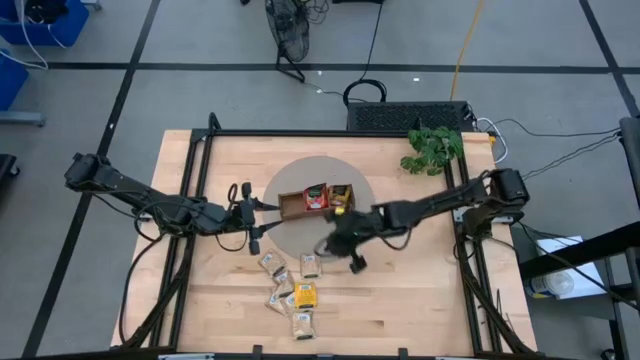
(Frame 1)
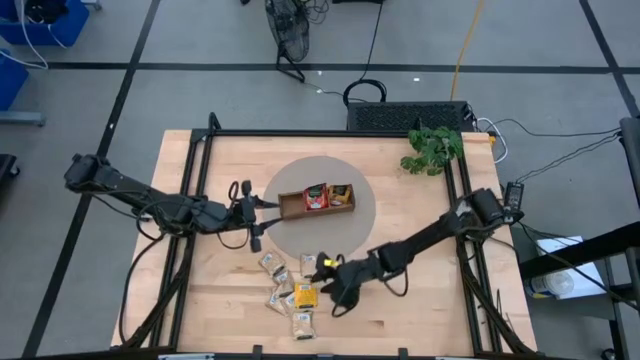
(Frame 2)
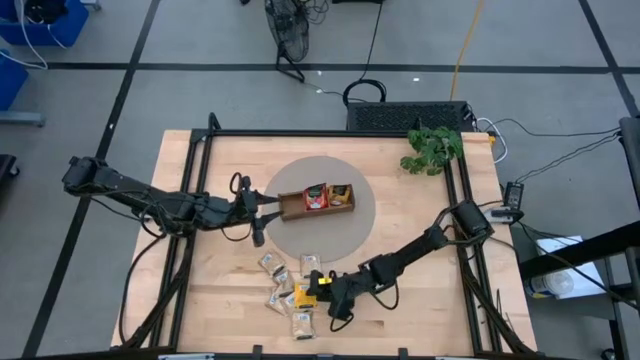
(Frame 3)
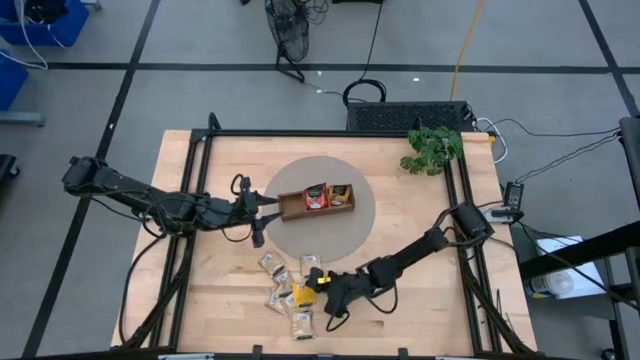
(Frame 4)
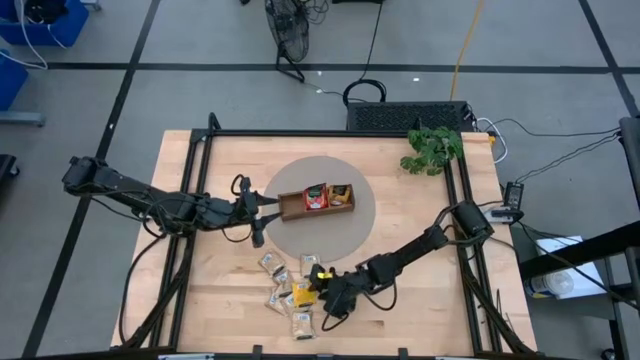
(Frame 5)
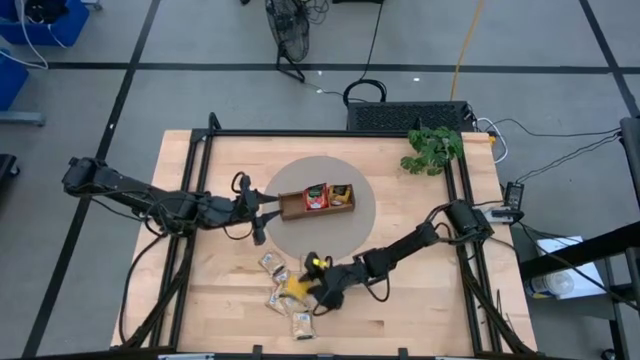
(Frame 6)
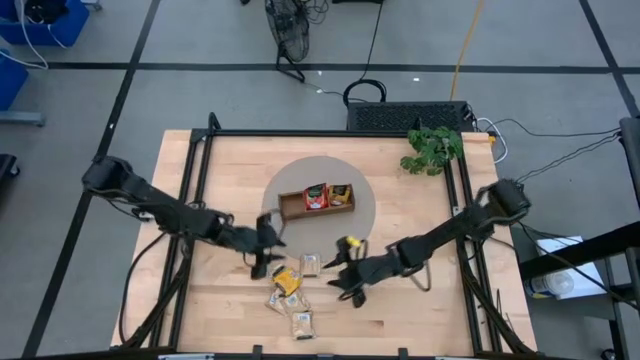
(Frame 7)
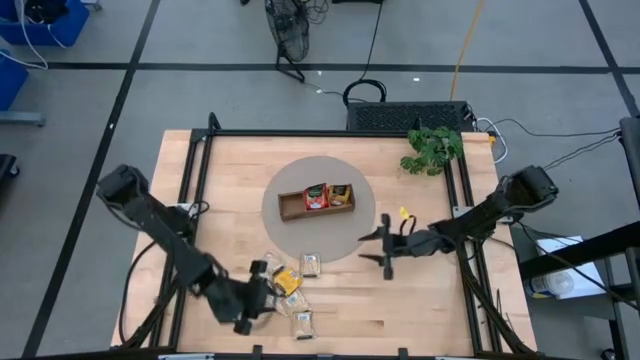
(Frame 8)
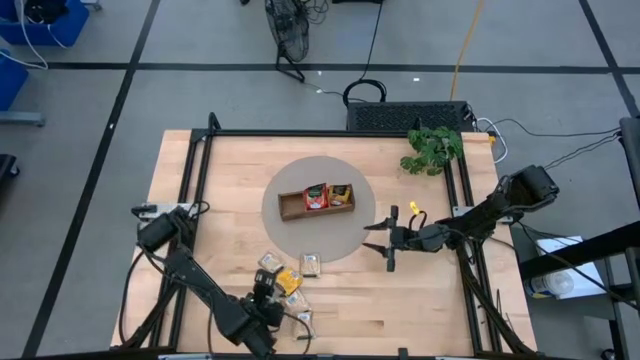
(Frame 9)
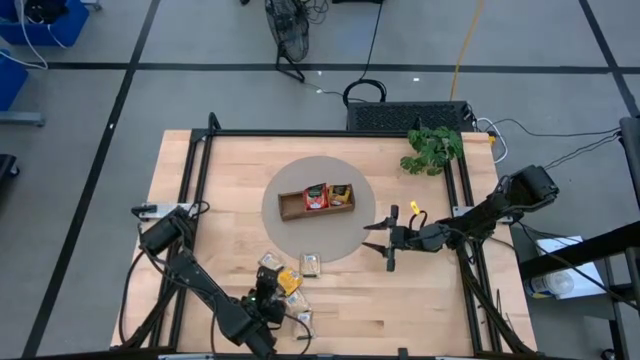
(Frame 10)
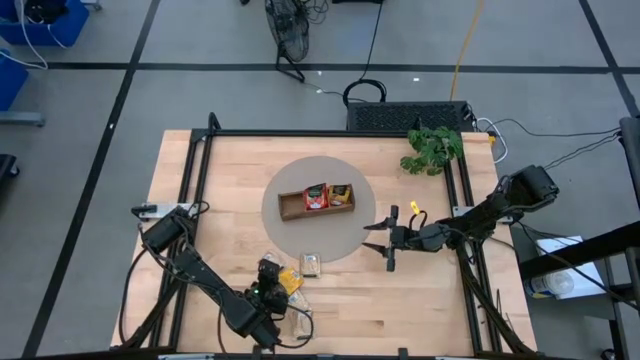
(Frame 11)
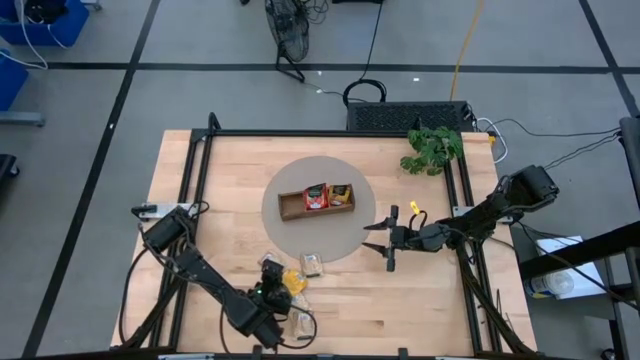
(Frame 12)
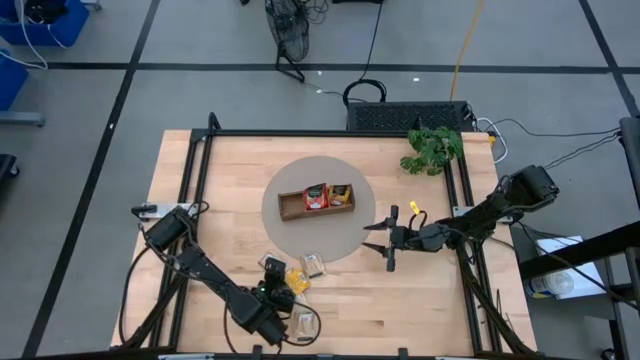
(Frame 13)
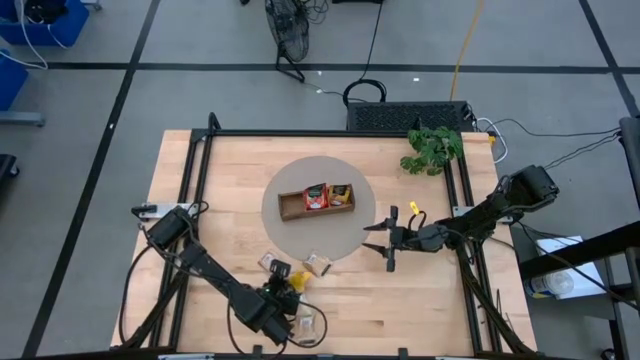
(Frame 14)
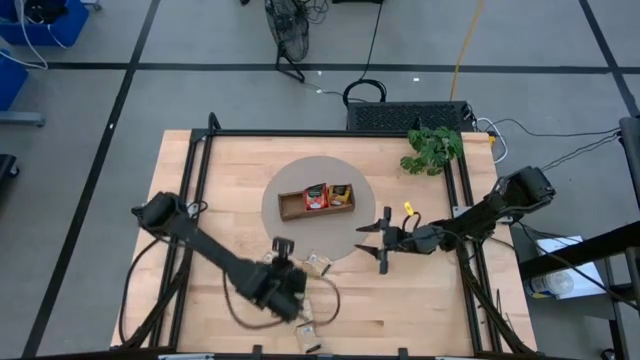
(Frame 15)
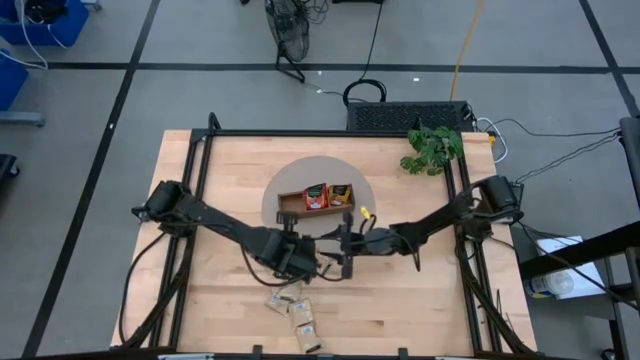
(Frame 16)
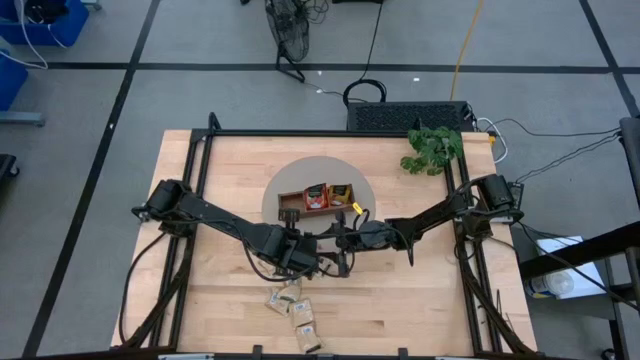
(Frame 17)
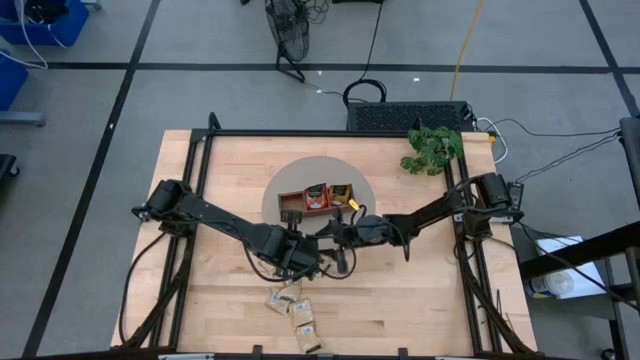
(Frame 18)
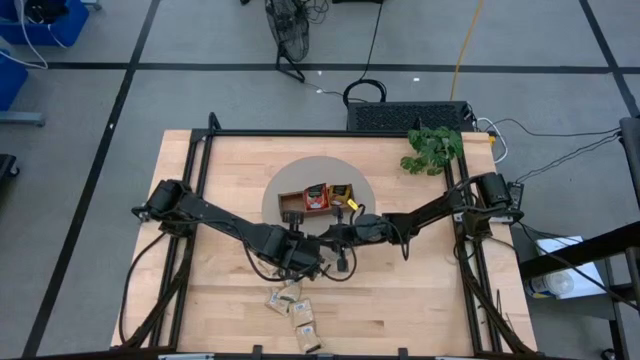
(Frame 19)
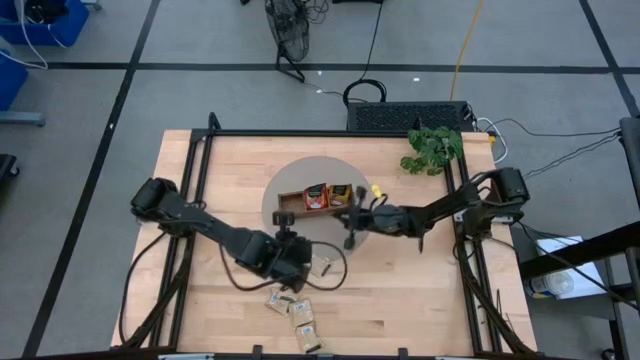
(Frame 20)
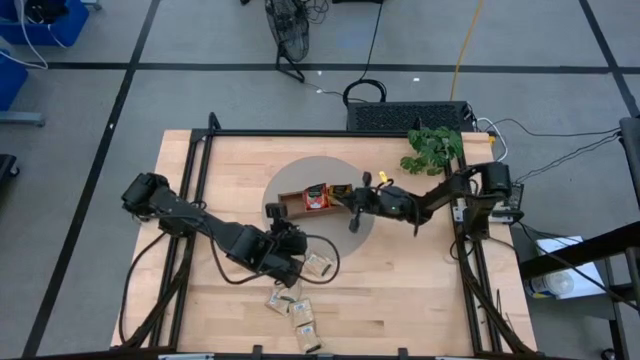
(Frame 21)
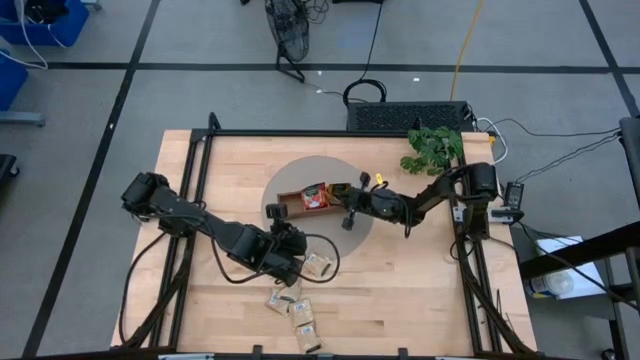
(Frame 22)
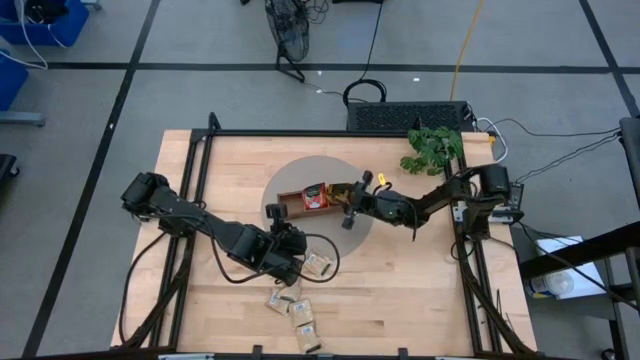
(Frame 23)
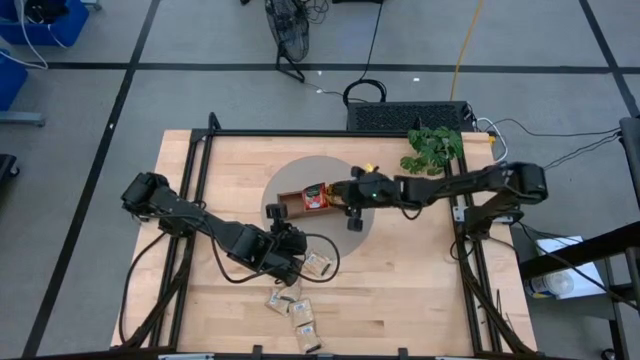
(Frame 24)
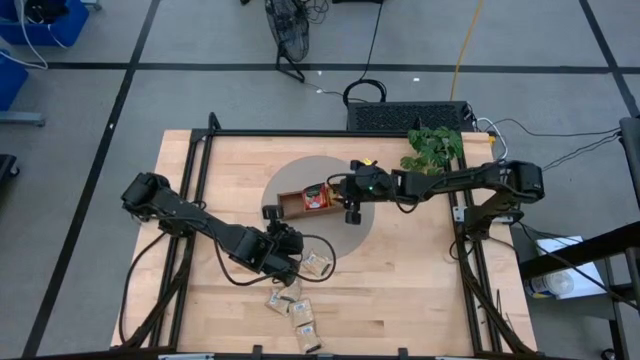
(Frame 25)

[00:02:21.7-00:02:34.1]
Task: Pick & Place Tea
Put the yellow tea bag into the wooden organizer

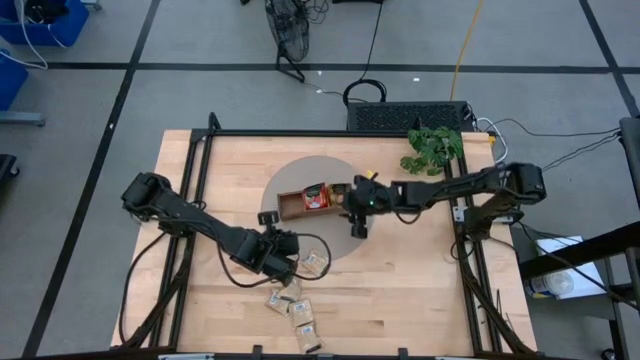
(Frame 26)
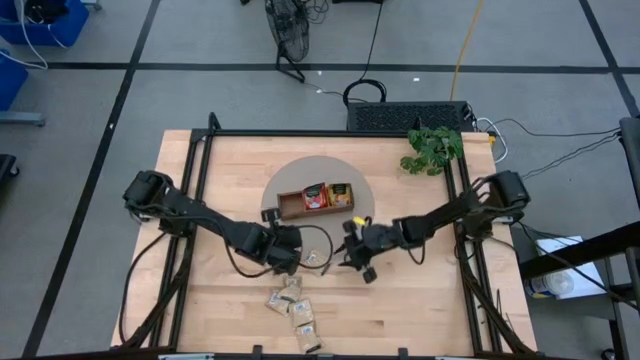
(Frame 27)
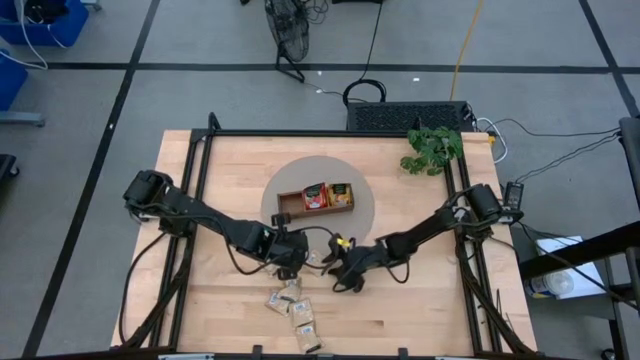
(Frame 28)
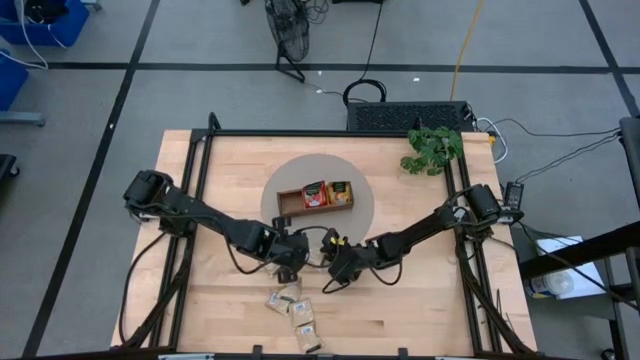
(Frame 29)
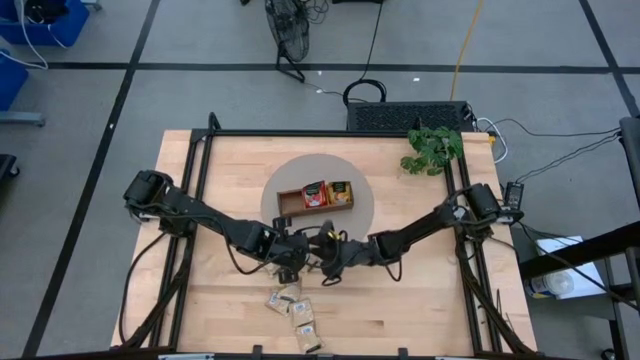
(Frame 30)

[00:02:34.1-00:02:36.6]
Put the brown tea bag into the wooden organizer

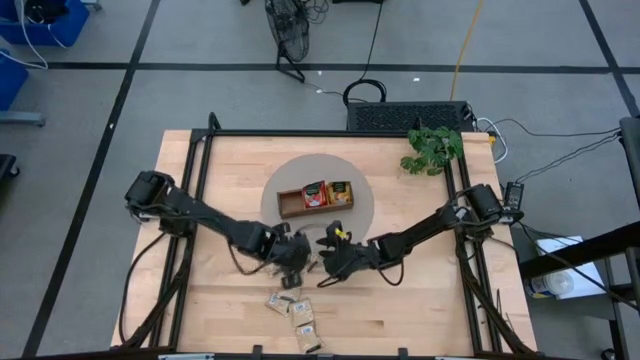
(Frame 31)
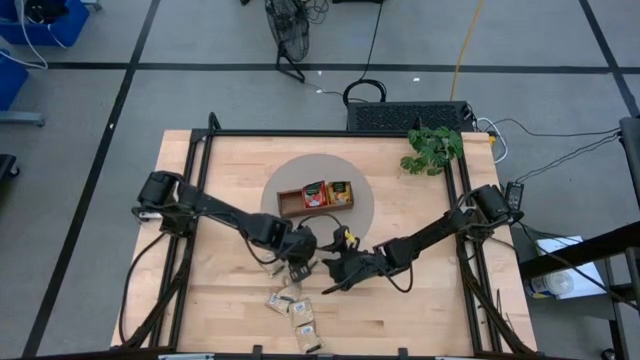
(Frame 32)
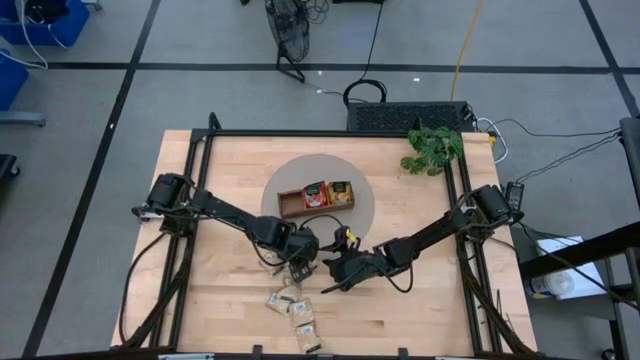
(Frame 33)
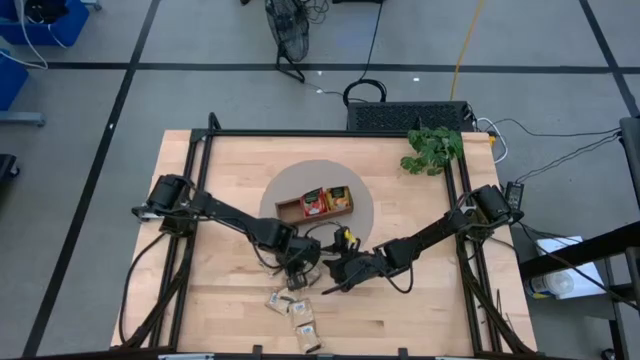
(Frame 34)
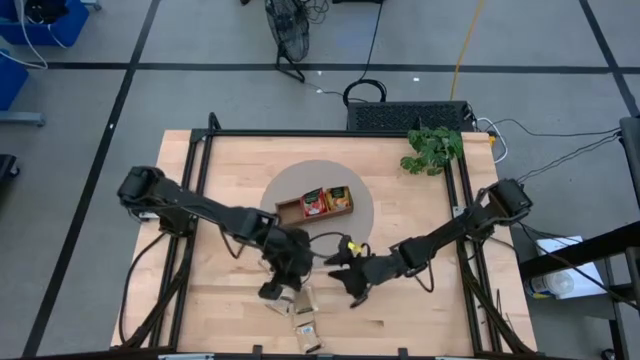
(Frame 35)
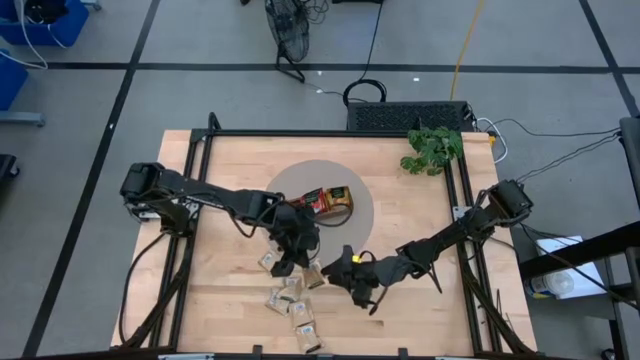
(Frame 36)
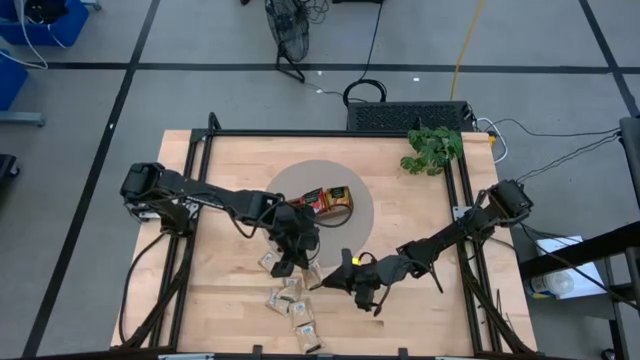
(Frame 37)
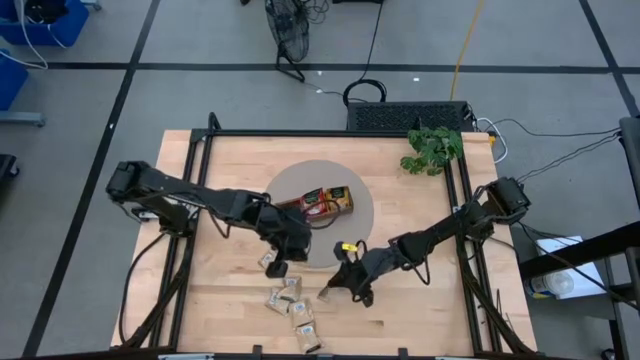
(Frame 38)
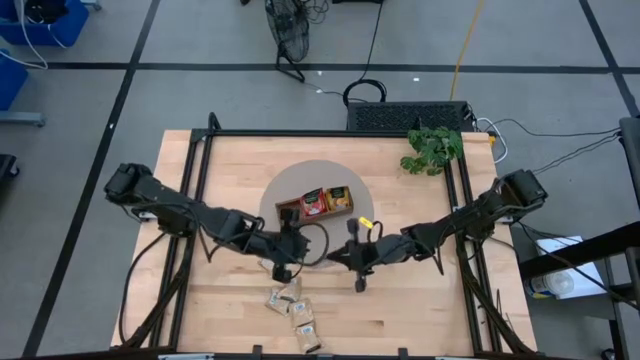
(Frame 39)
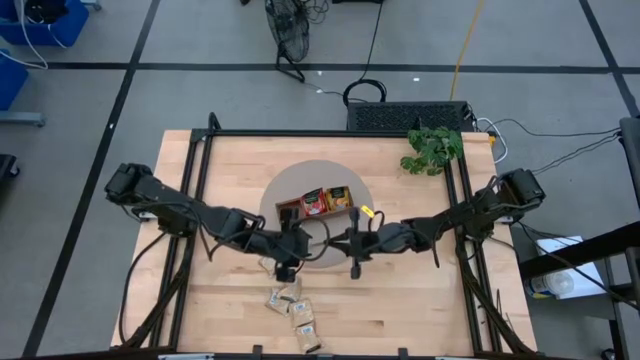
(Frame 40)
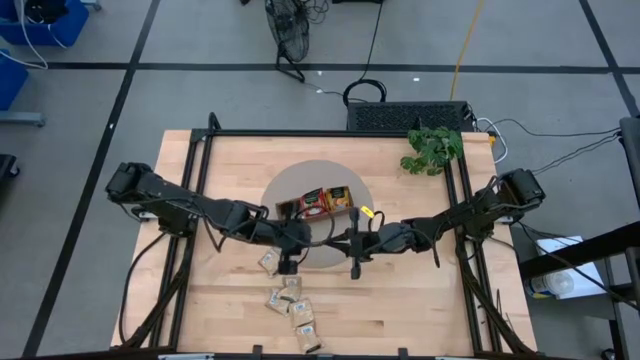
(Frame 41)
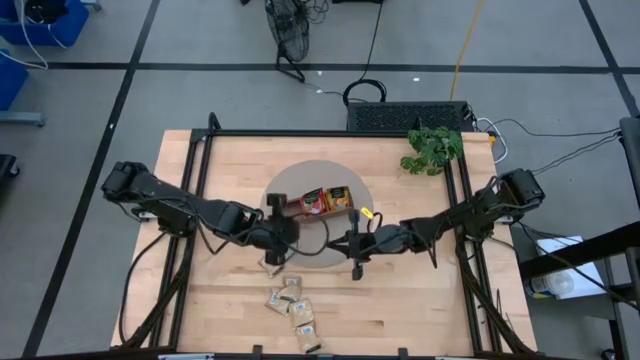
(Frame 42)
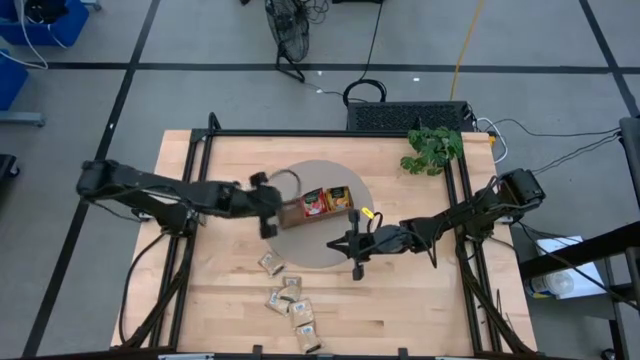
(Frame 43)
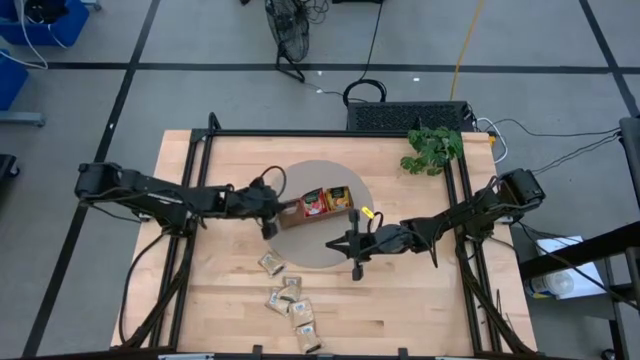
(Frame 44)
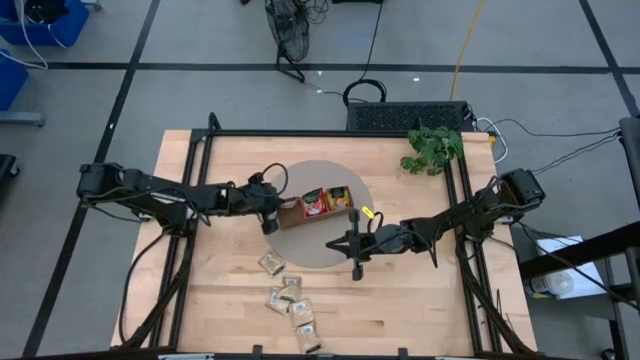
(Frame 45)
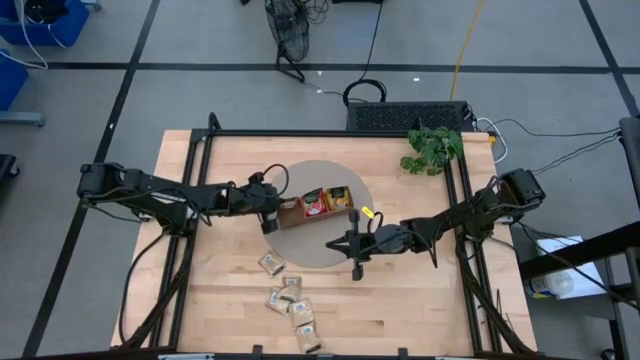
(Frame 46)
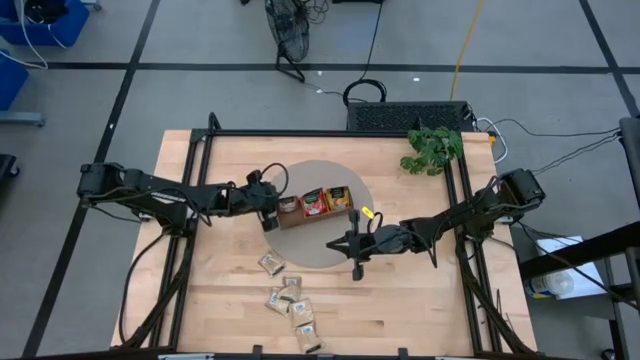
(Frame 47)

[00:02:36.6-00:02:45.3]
Put the brown tea bag into the wooden organizer
